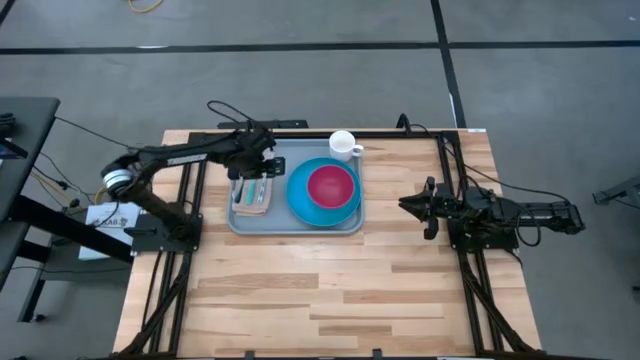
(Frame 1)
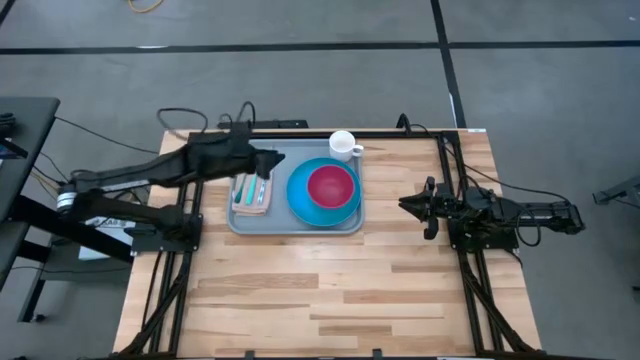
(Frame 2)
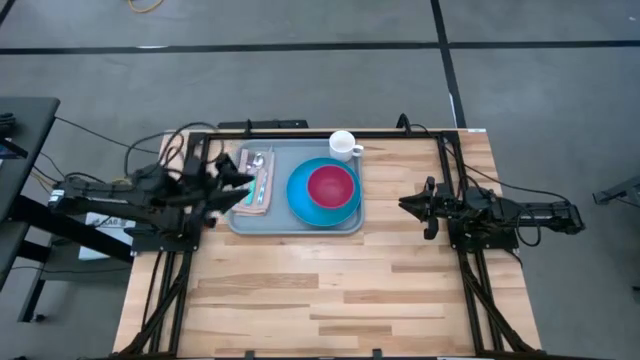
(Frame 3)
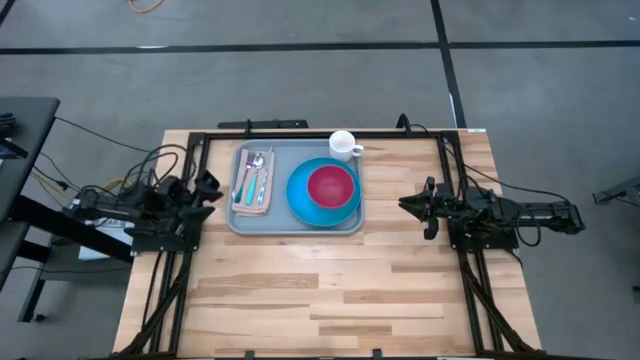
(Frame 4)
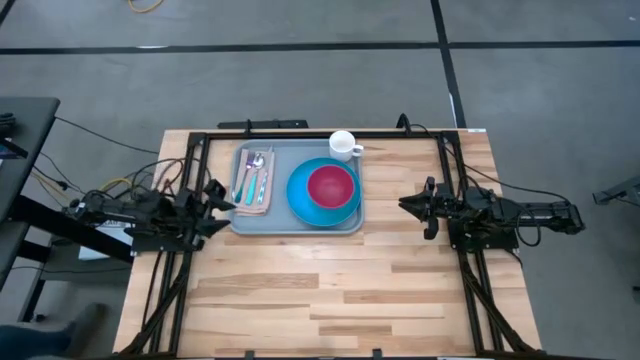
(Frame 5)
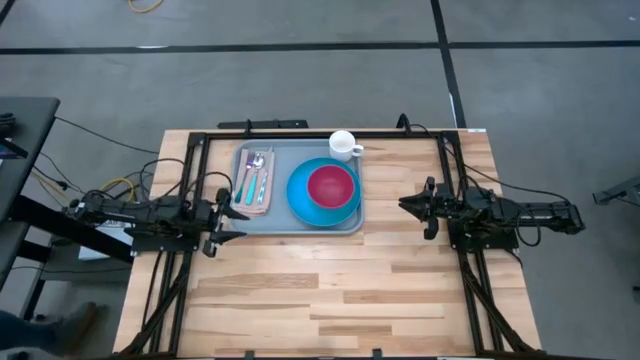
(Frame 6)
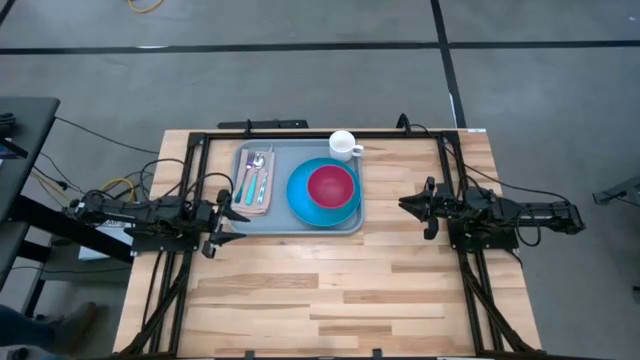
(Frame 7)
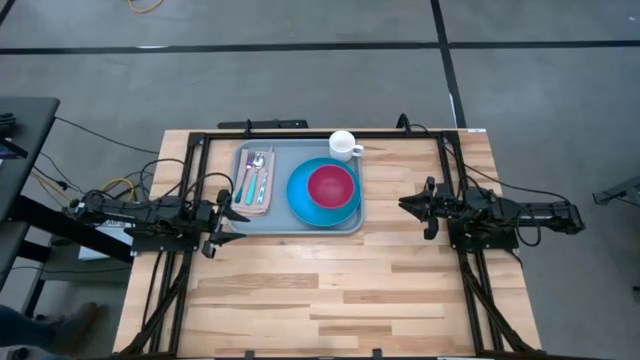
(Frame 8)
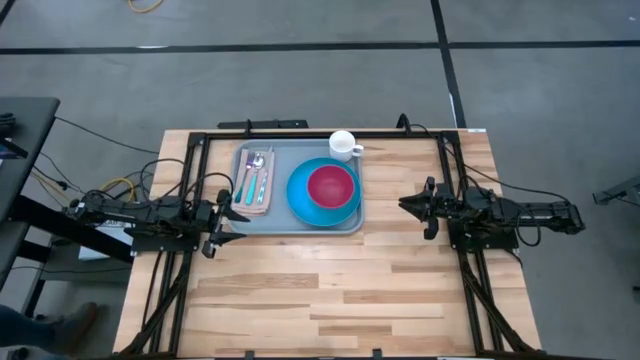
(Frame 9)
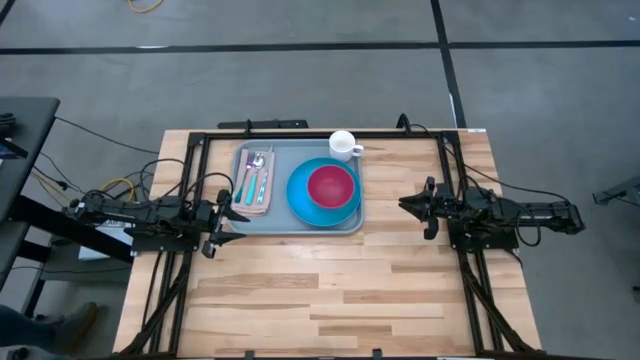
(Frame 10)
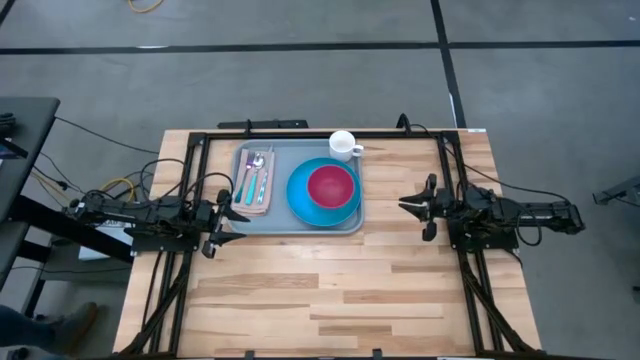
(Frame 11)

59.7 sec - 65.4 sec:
Task: Set up tray
Return to Home Position

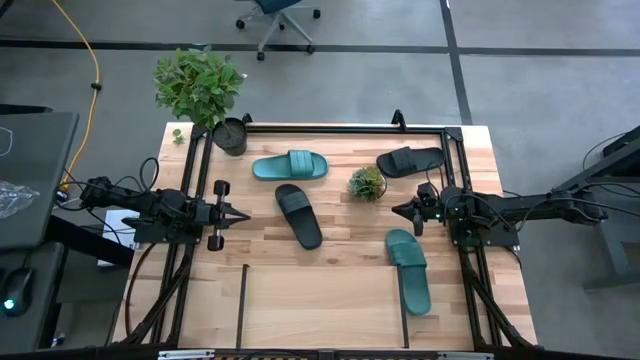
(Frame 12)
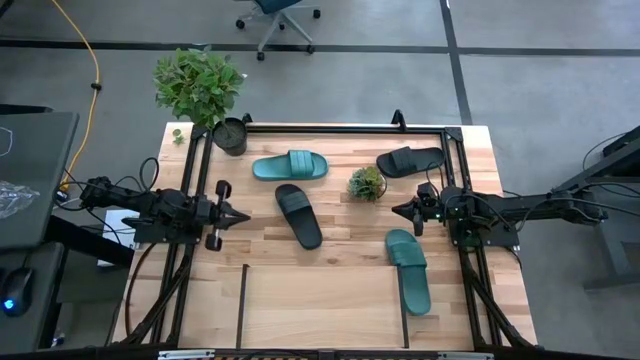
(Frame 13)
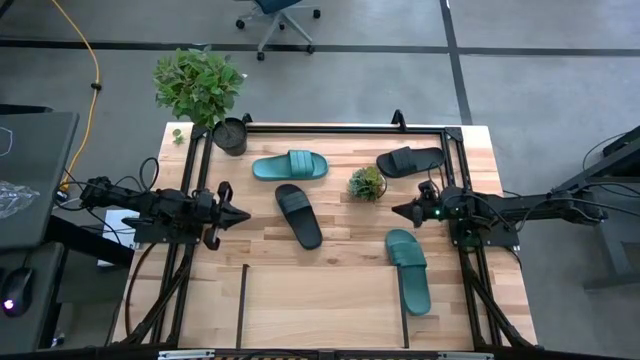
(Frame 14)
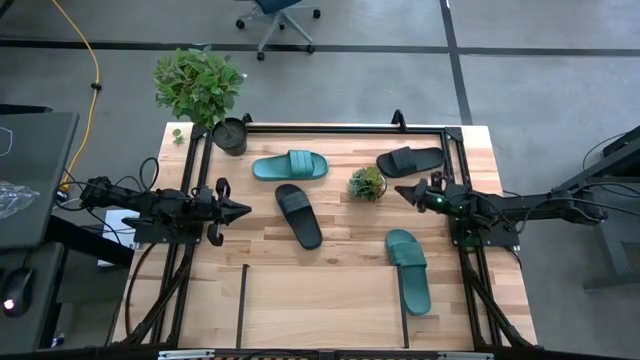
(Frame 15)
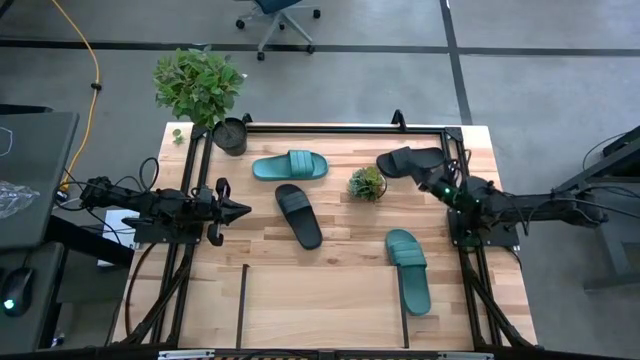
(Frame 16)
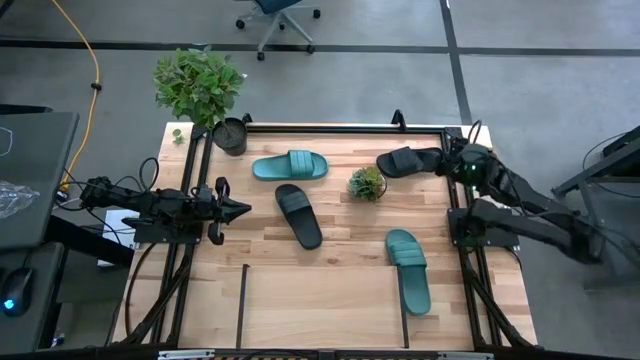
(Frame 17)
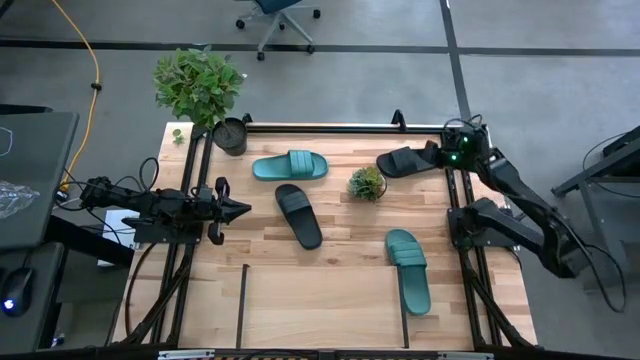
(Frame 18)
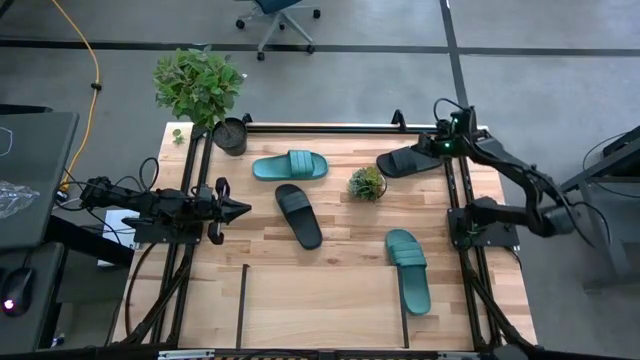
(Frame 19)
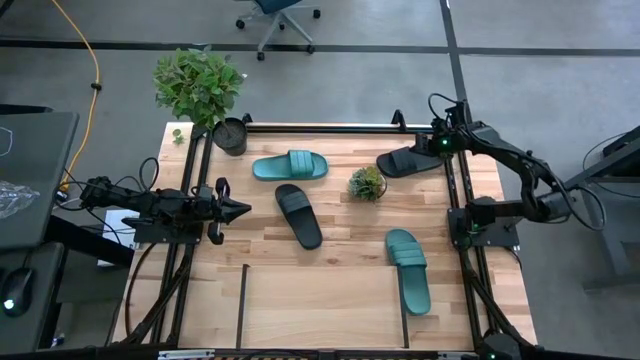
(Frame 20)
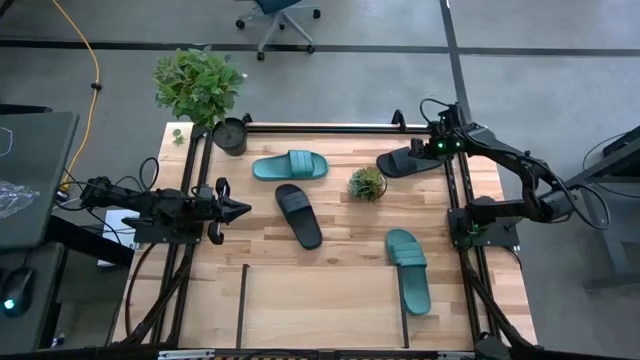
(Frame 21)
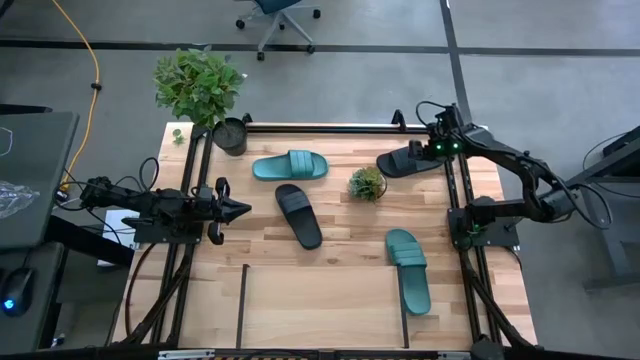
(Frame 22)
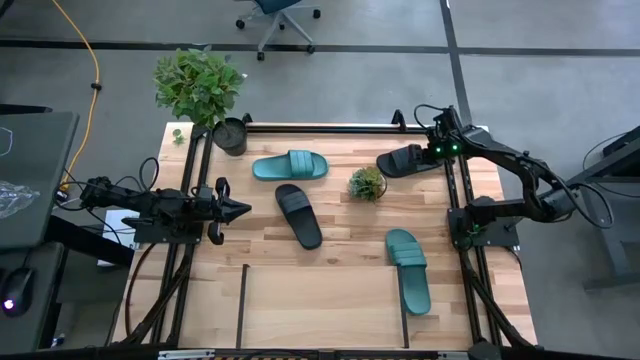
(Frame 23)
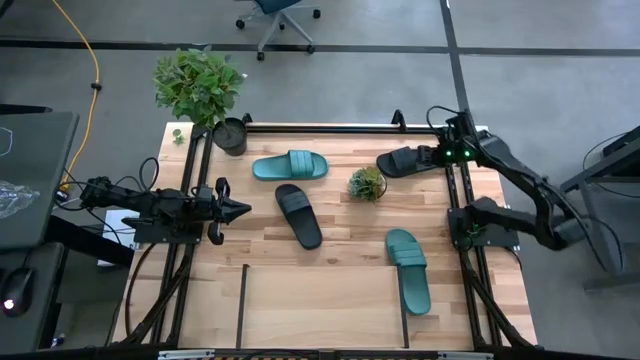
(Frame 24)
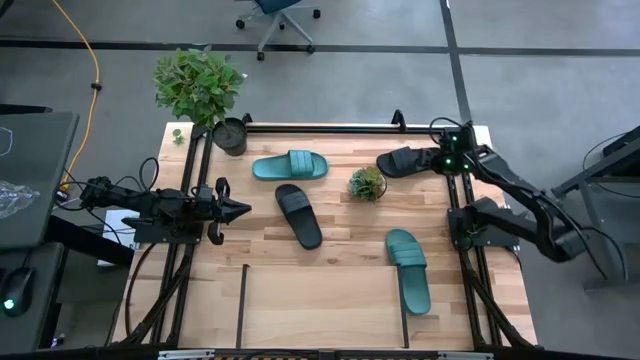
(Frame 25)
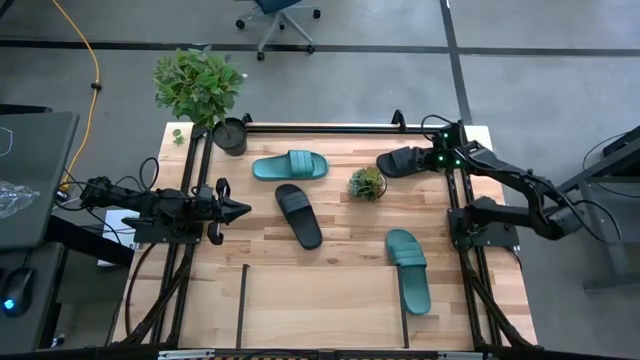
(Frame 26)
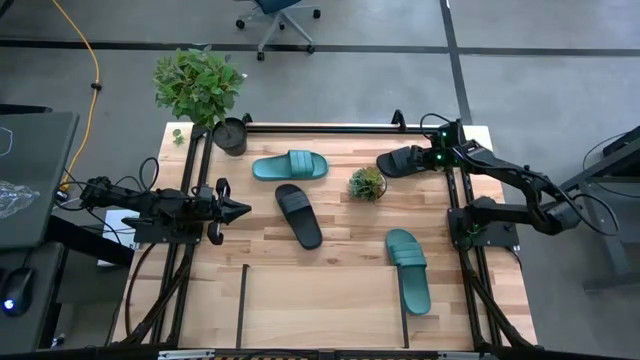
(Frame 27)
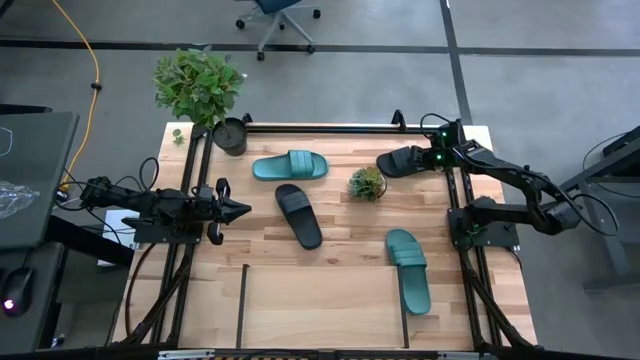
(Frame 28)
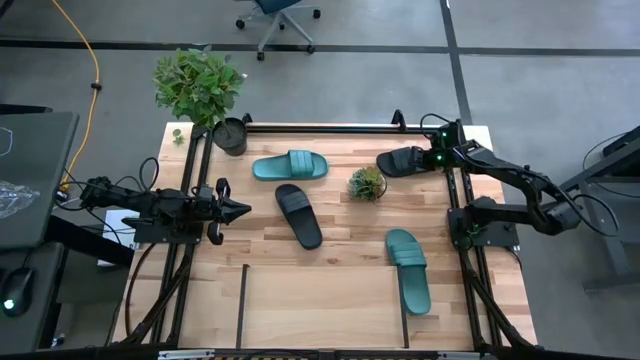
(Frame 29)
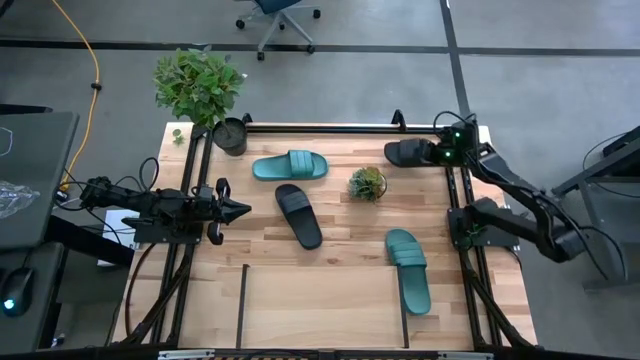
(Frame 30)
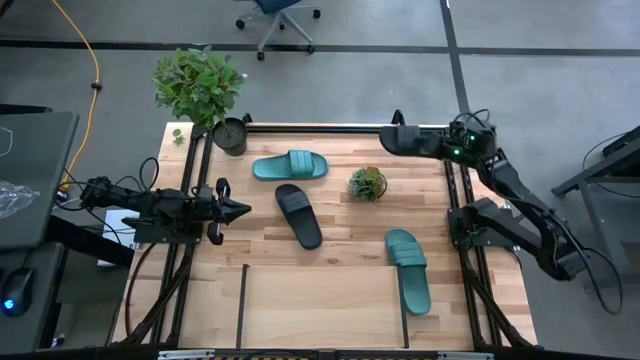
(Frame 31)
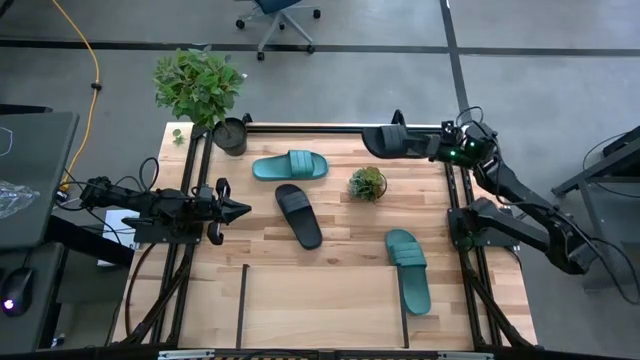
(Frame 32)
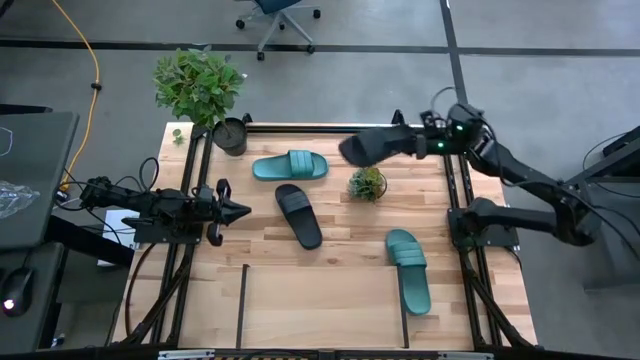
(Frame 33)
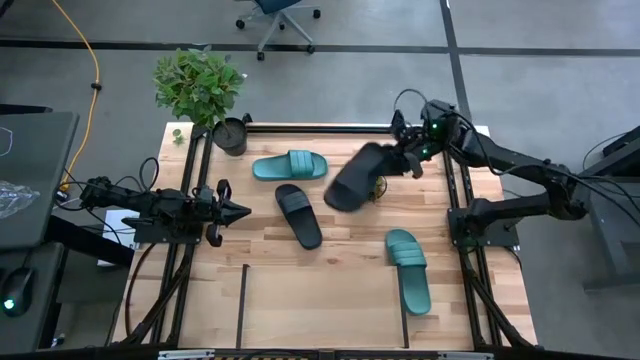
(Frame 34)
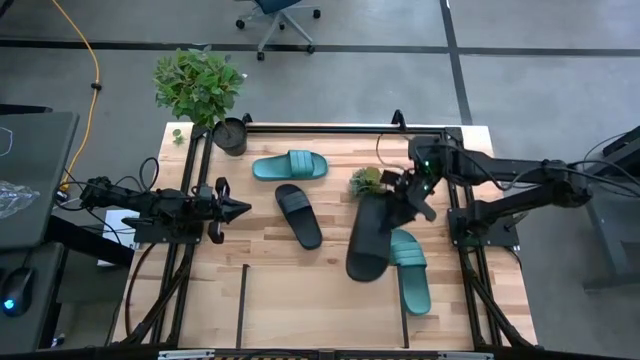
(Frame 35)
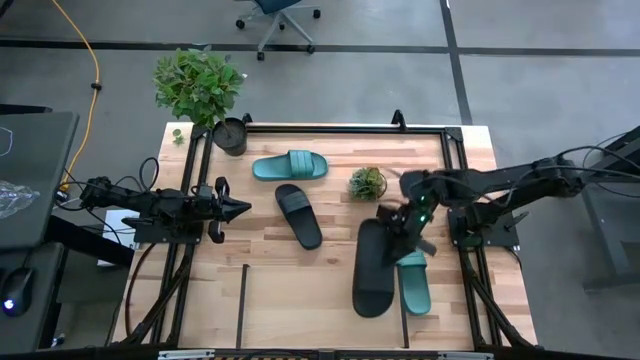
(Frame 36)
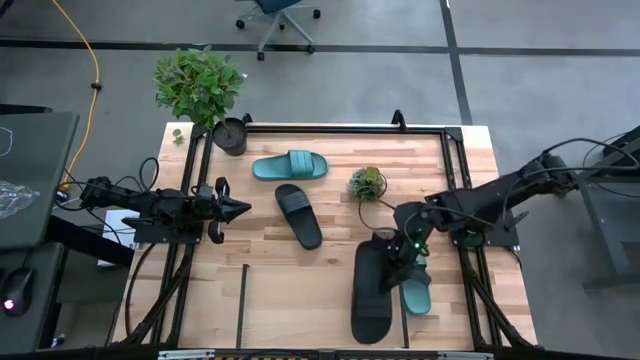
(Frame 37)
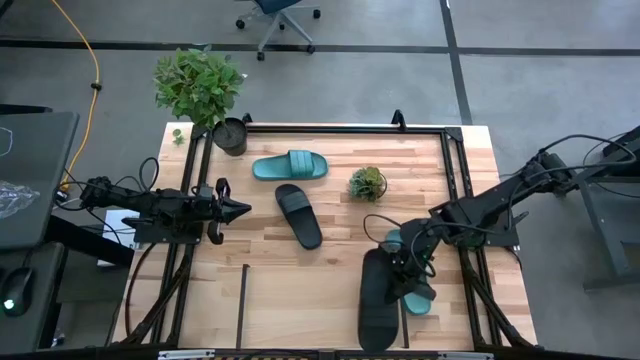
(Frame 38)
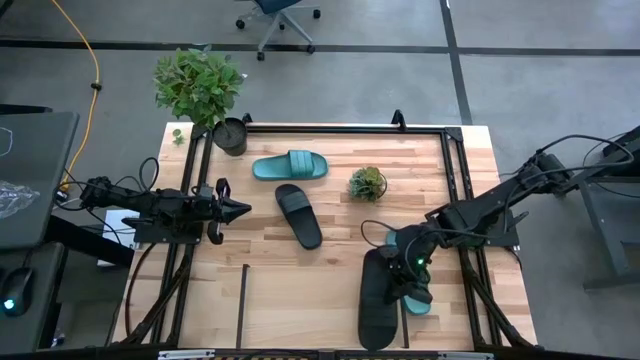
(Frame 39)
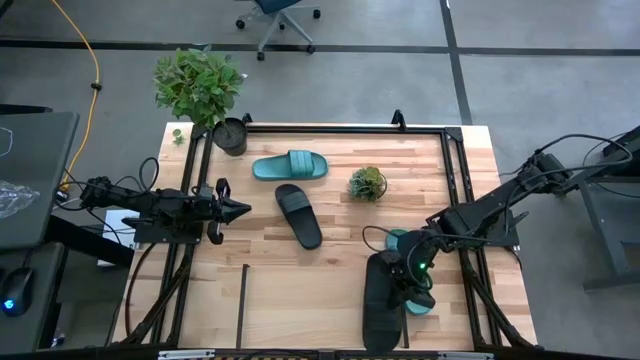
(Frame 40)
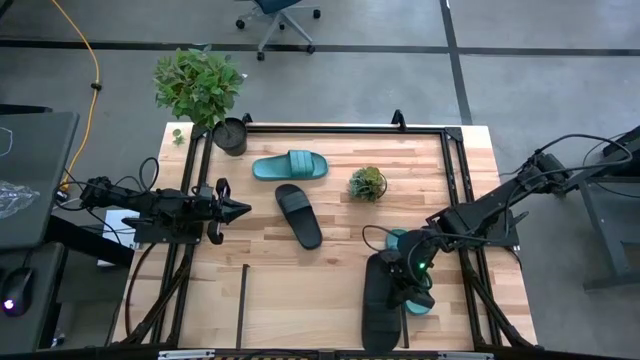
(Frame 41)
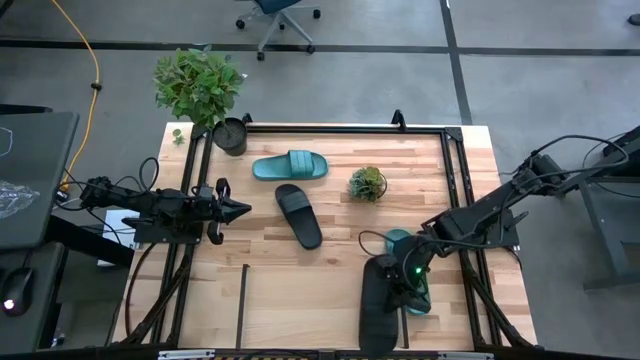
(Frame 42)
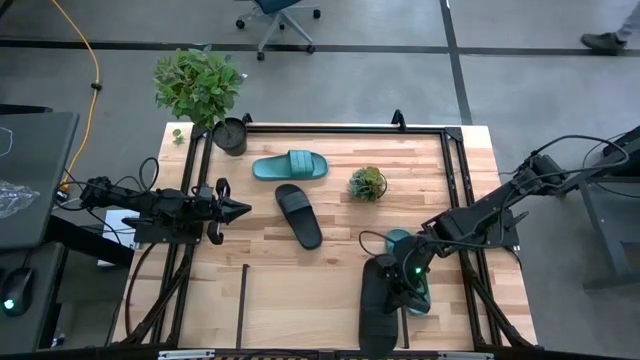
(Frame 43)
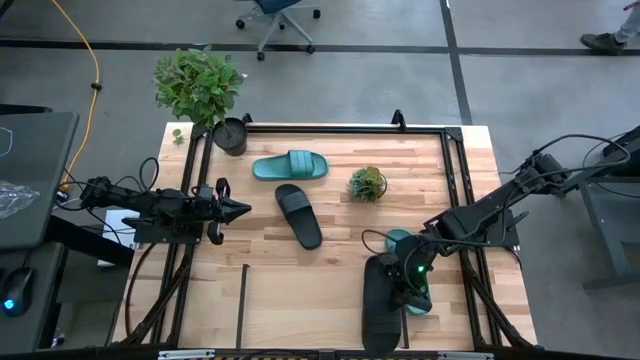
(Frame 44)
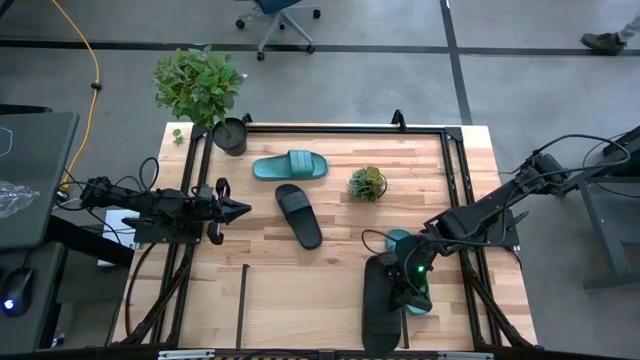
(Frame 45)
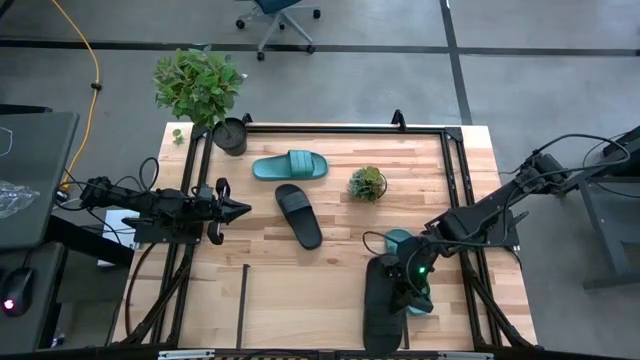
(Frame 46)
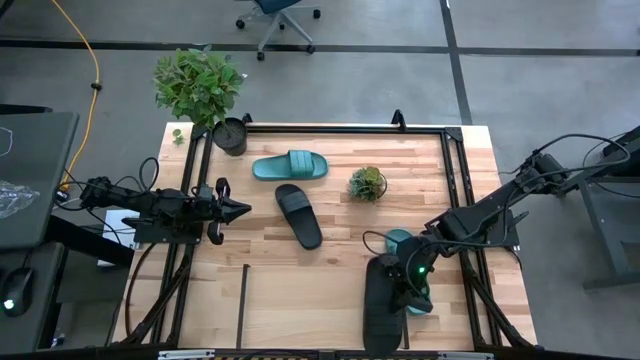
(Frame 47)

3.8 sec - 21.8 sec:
Task: Pick and place slides into the shelf
Put the top black slide on the shelf
